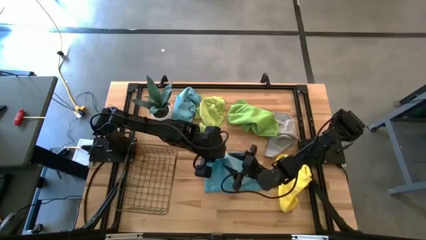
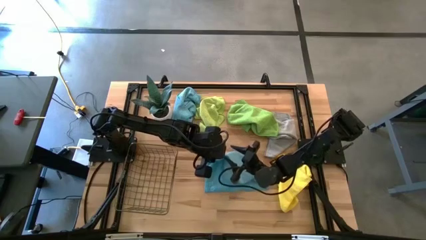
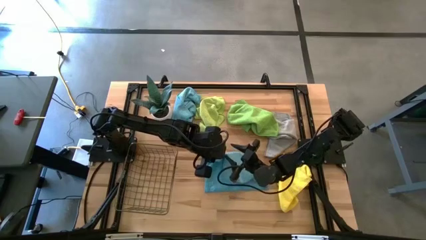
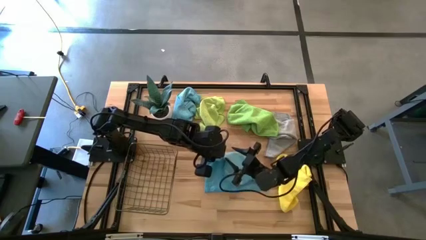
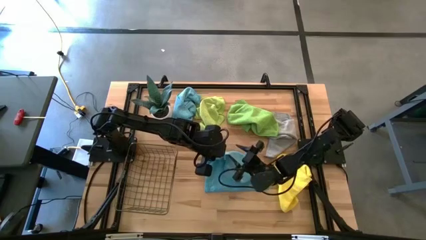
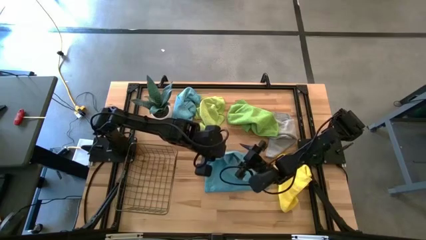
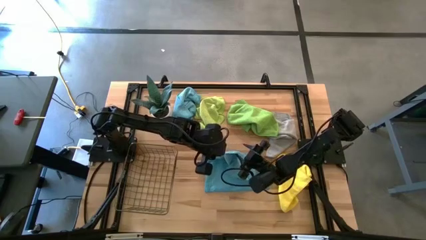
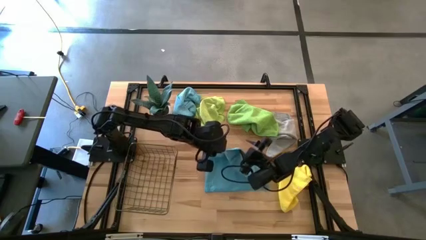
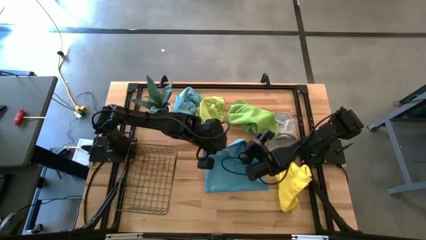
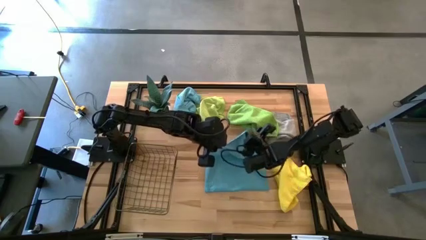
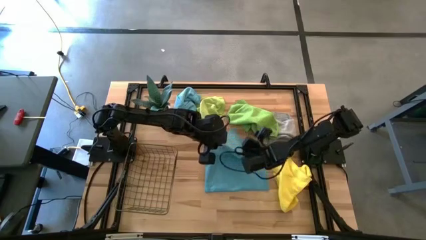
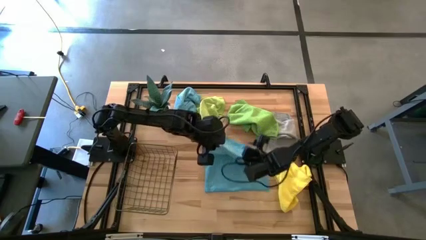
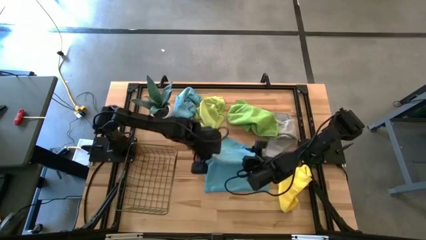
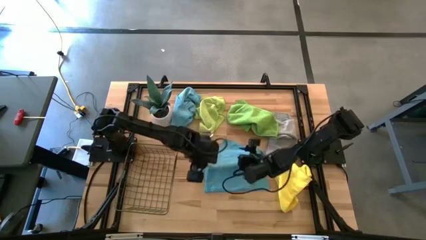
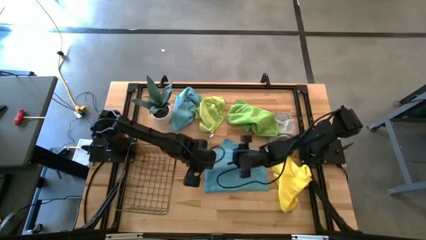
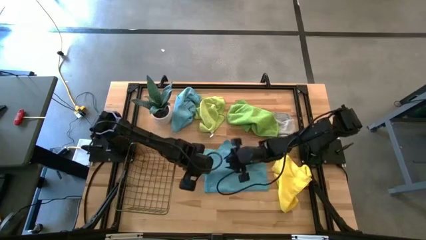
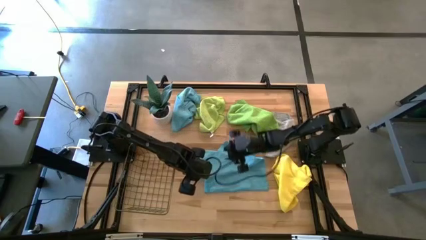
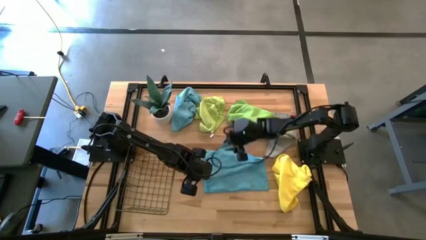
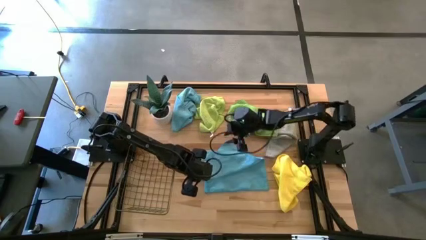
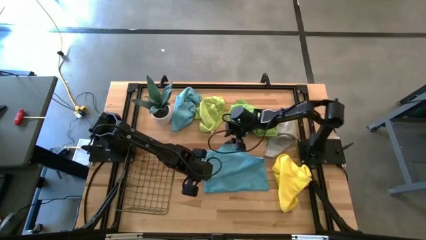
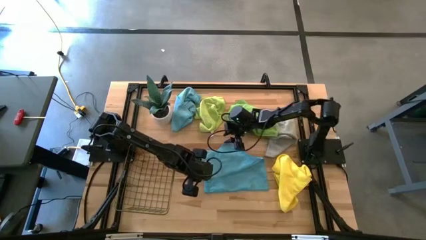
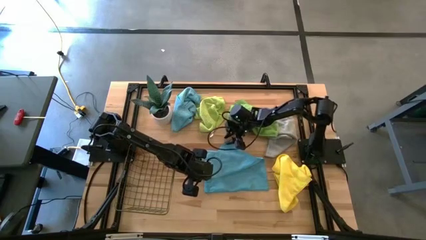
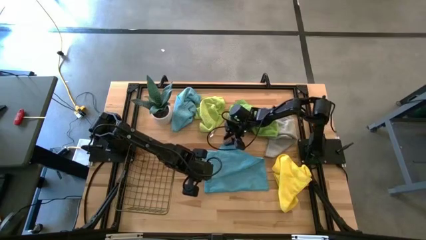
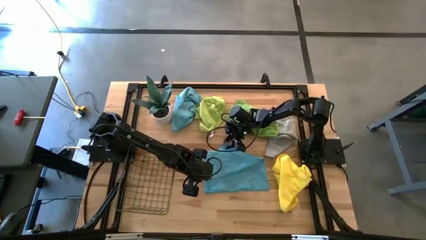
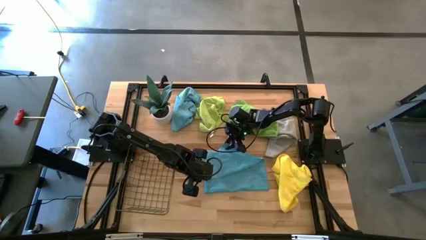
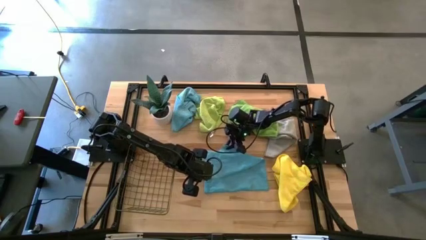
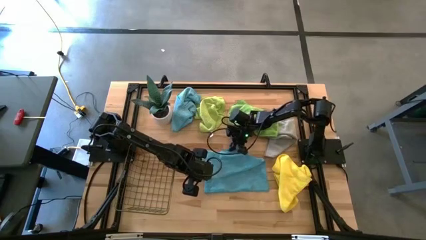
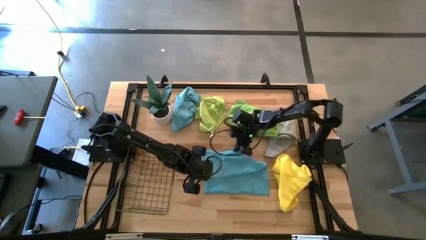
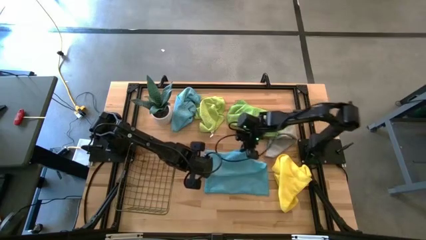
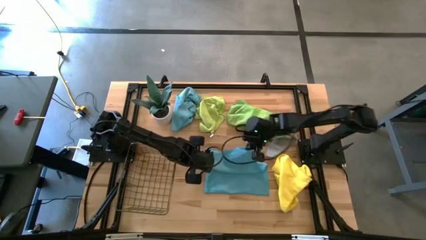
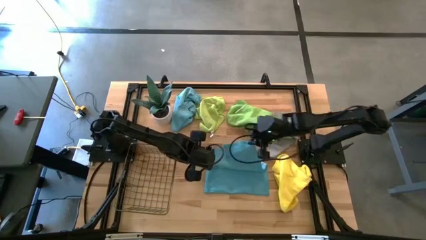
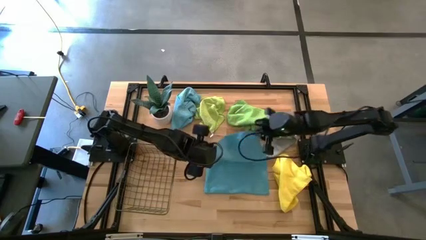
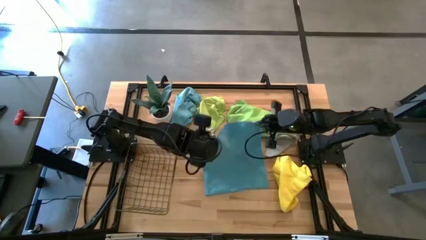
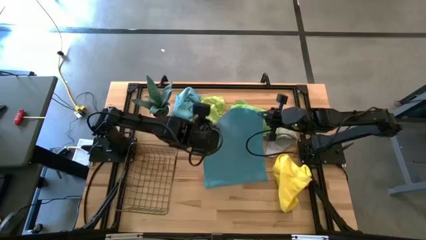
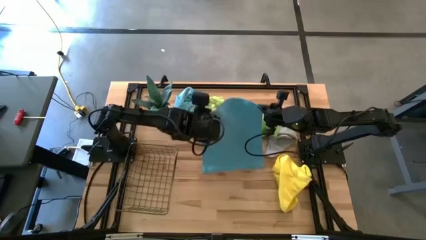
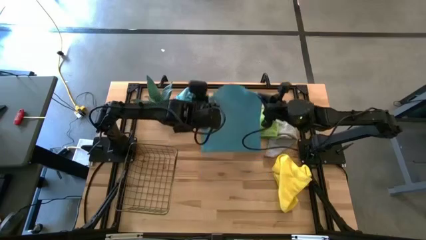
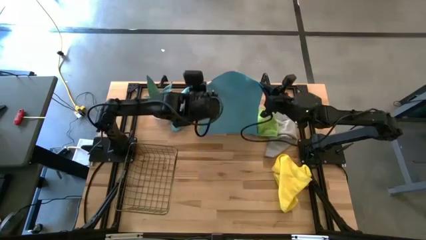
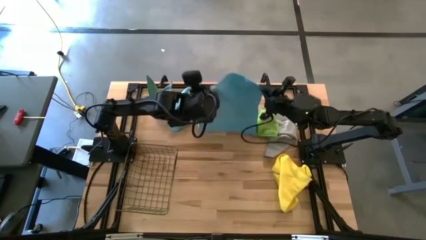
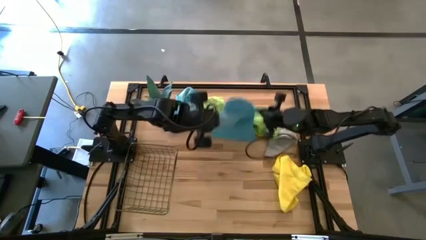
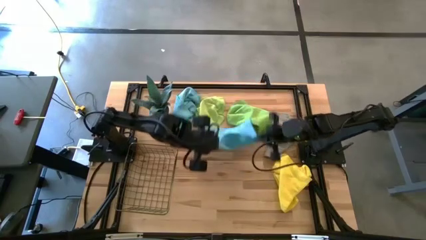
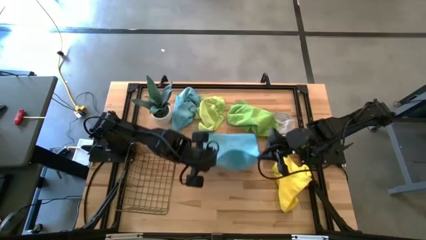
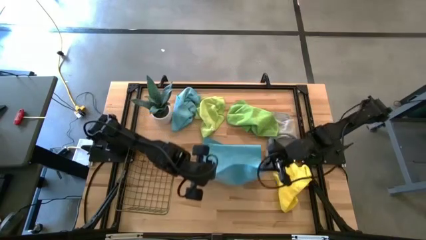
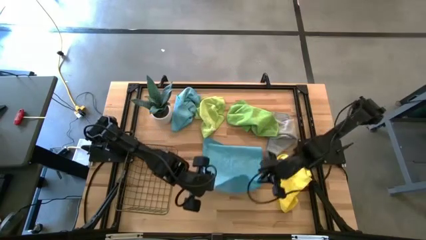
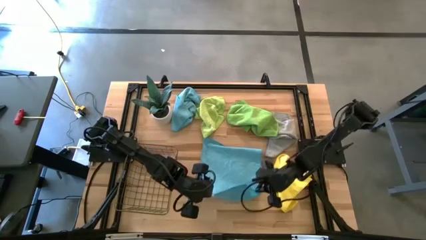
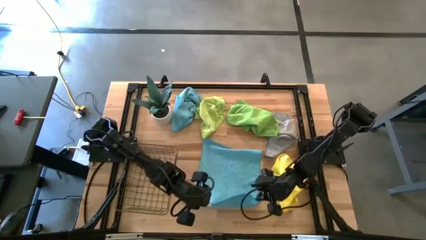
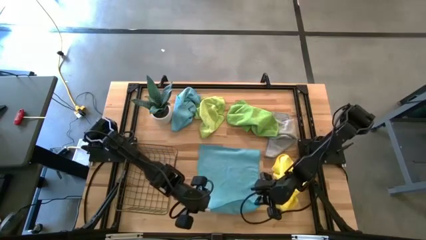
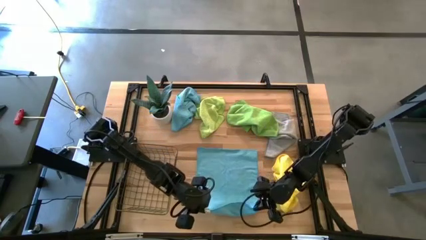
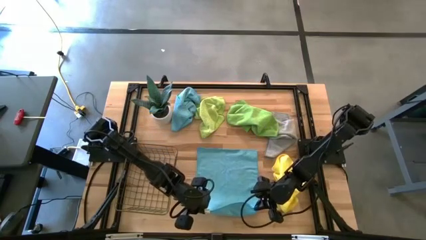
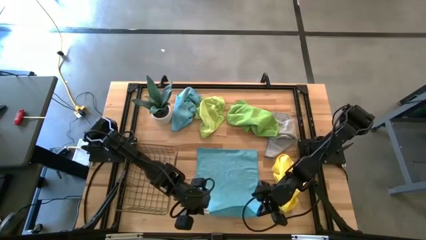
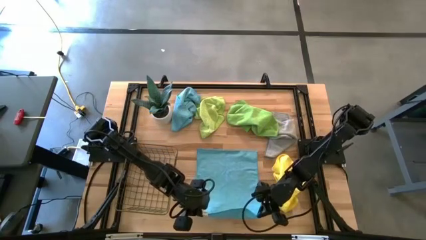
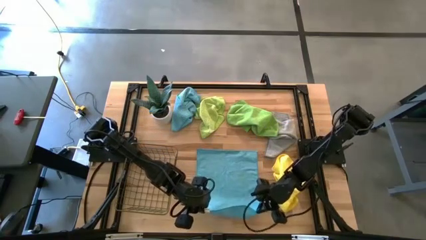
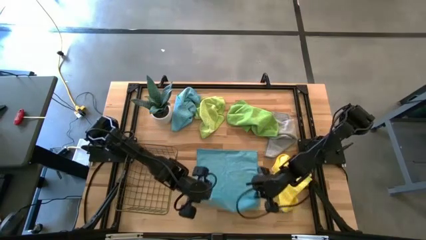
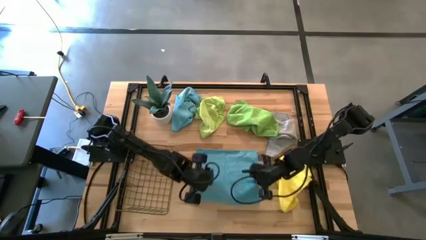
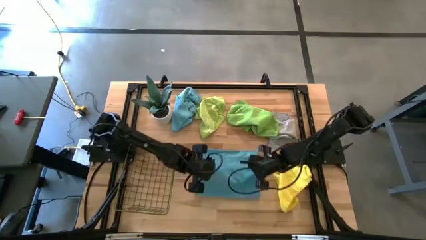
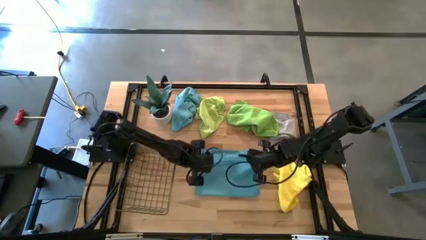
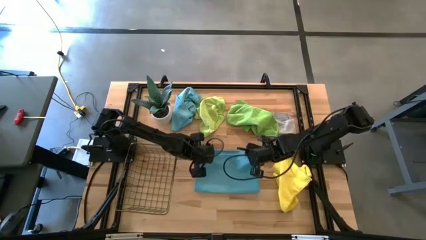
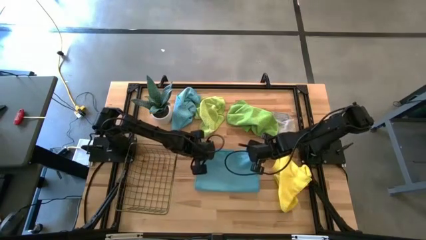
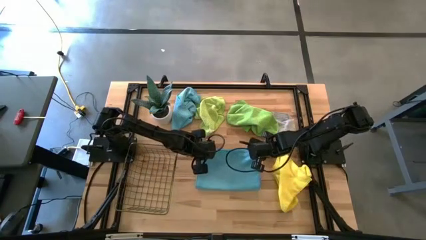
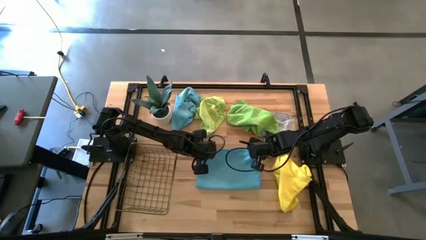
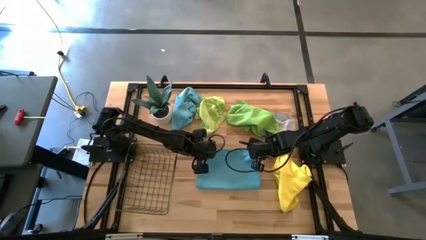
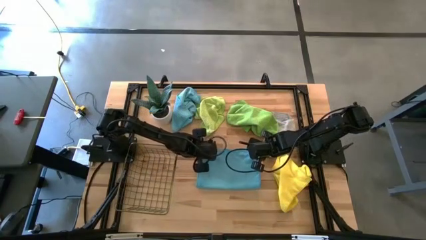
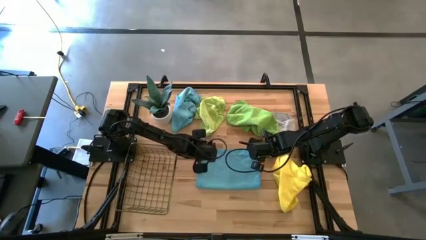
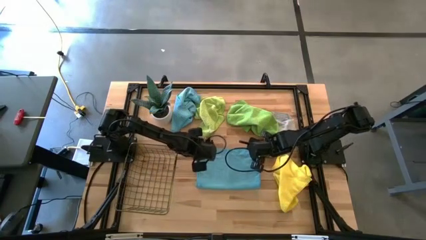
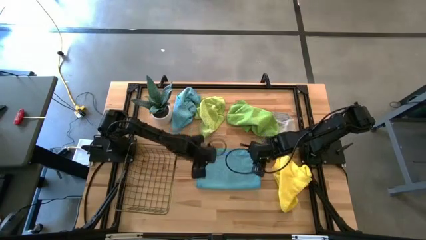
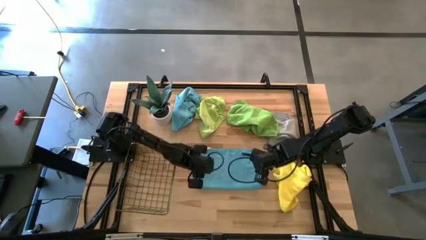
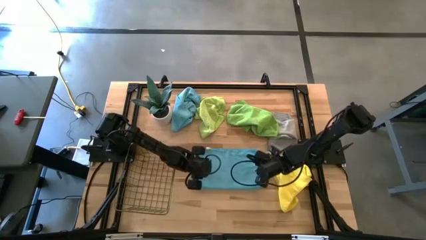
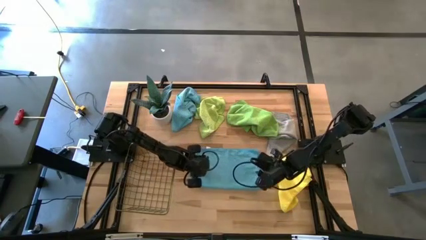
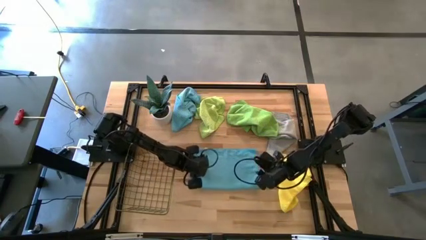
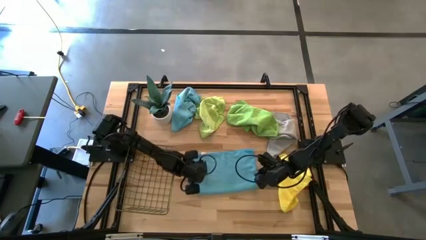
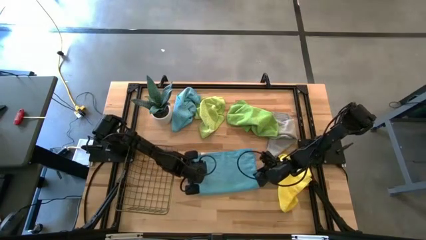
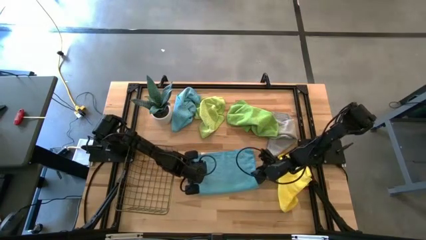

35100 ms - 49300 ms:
Task: Fold microfiber towels
Fold the bottom blue microfiber towel
